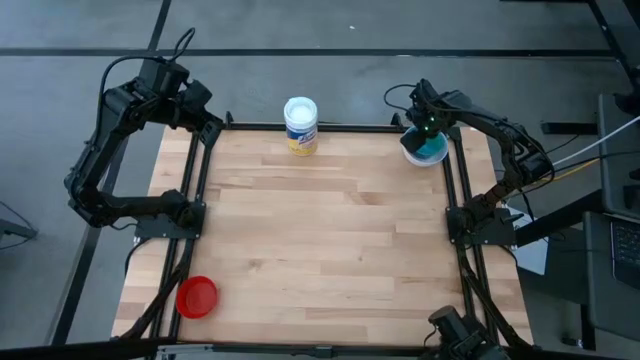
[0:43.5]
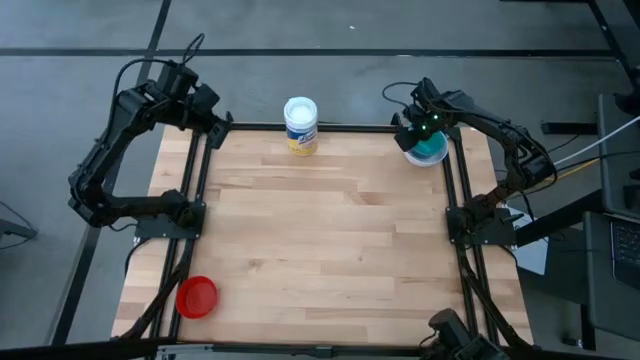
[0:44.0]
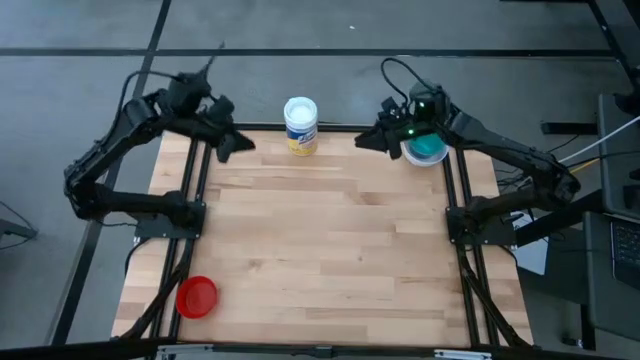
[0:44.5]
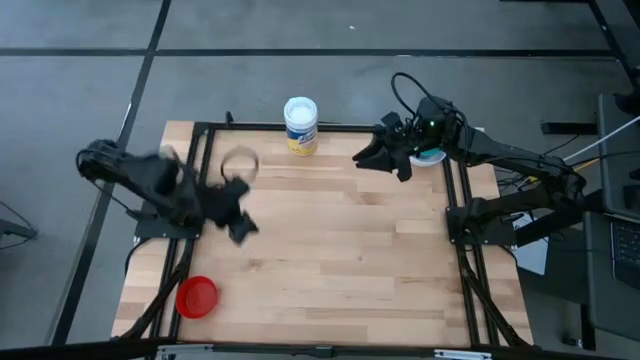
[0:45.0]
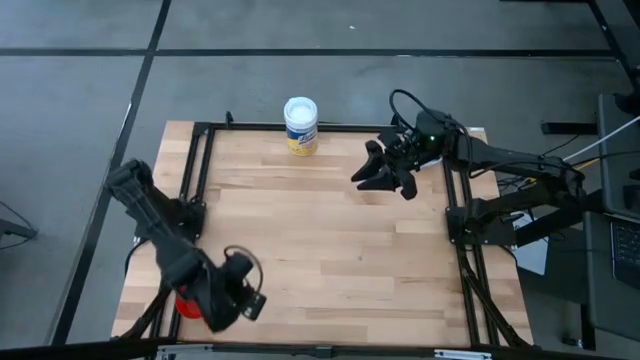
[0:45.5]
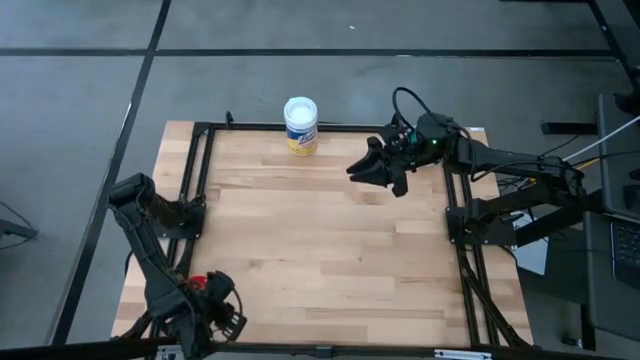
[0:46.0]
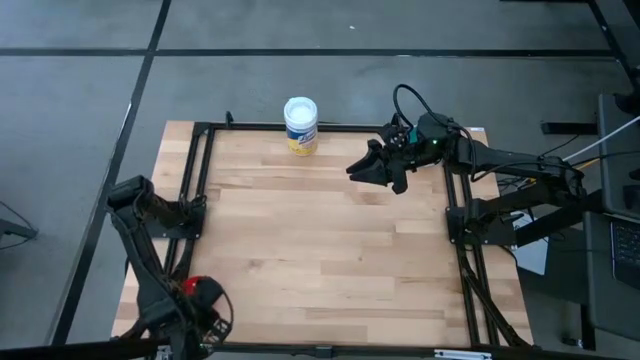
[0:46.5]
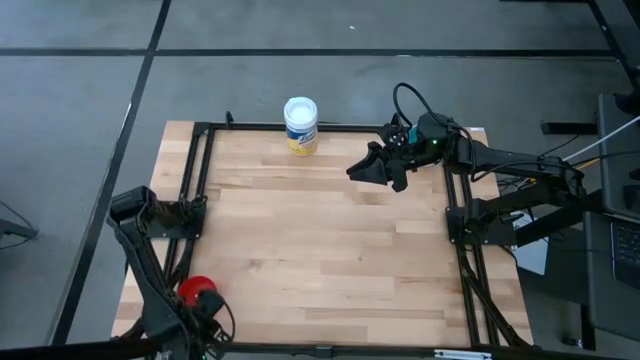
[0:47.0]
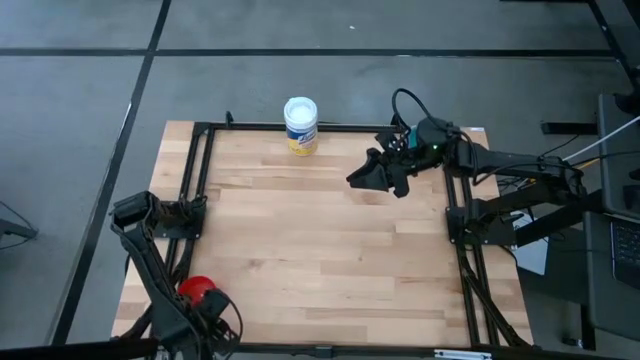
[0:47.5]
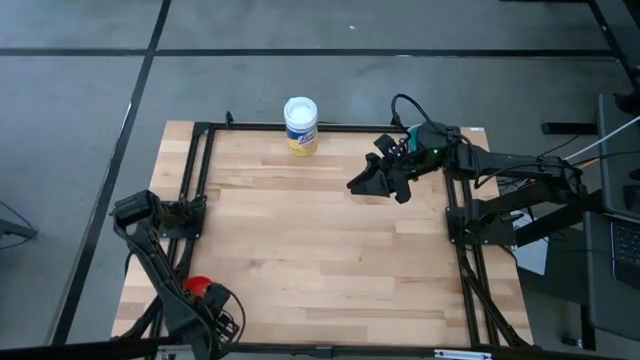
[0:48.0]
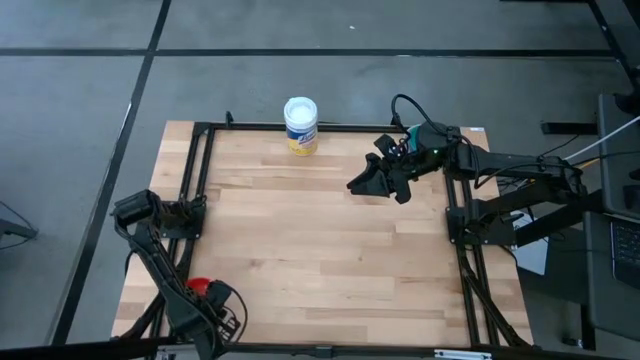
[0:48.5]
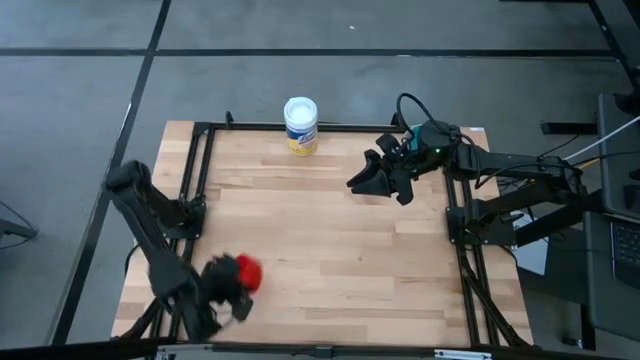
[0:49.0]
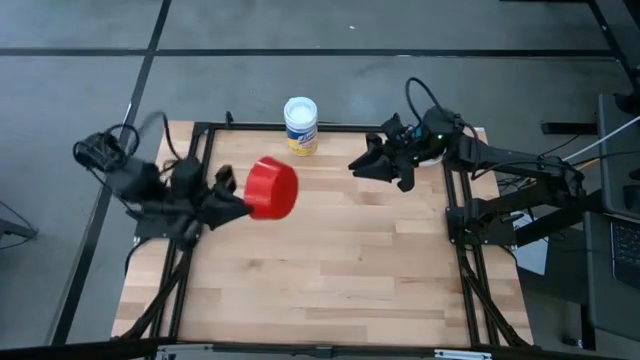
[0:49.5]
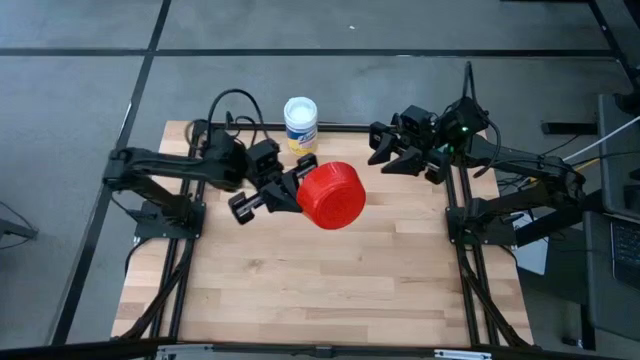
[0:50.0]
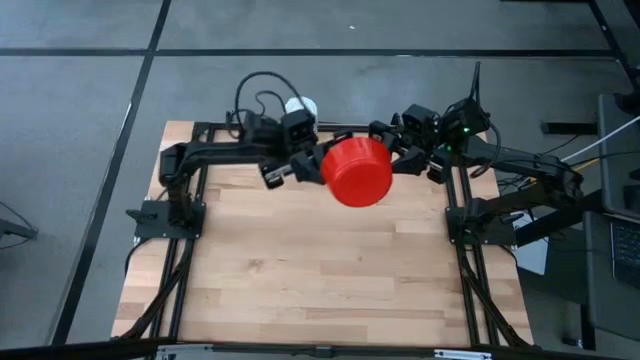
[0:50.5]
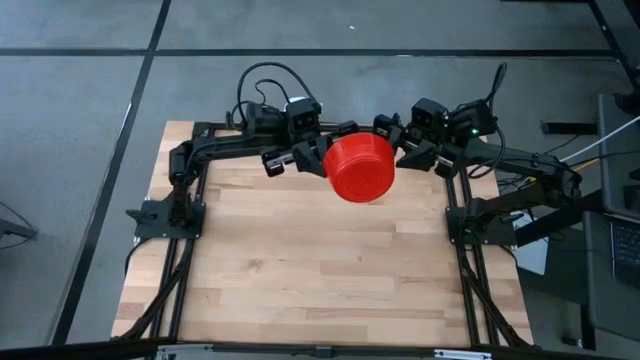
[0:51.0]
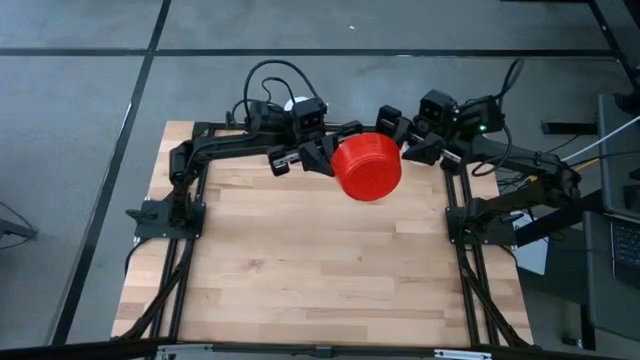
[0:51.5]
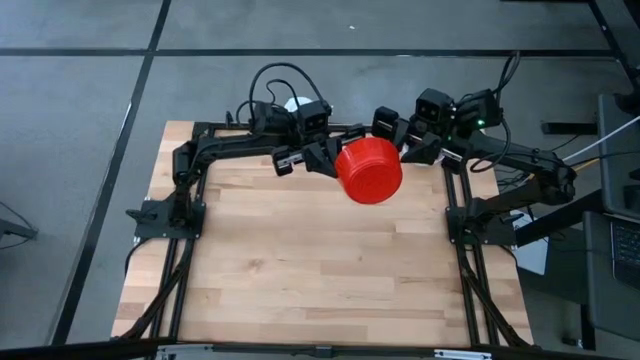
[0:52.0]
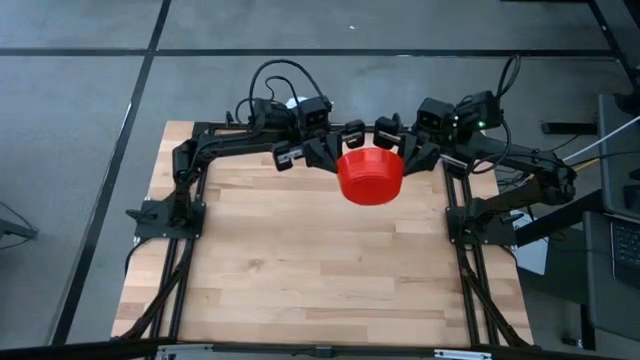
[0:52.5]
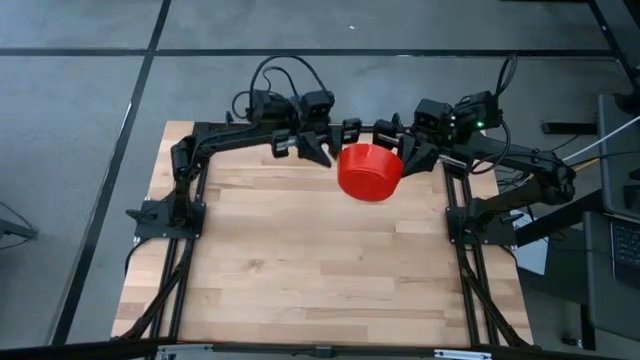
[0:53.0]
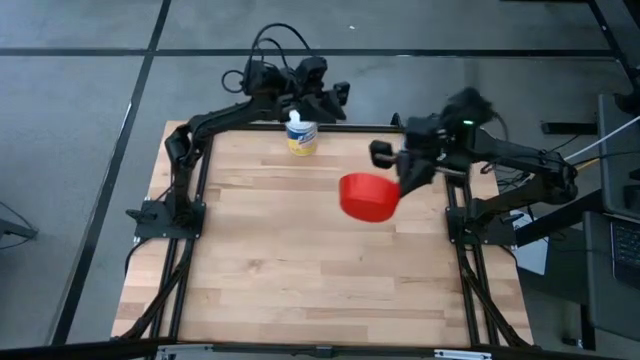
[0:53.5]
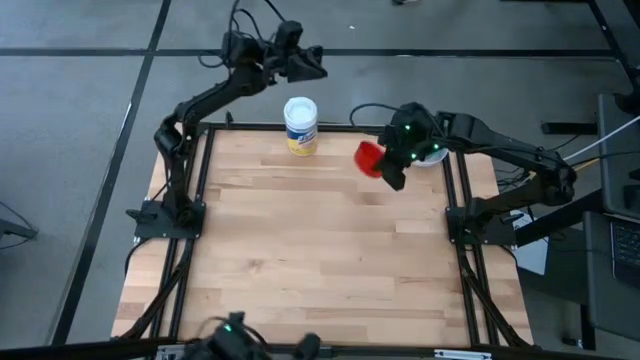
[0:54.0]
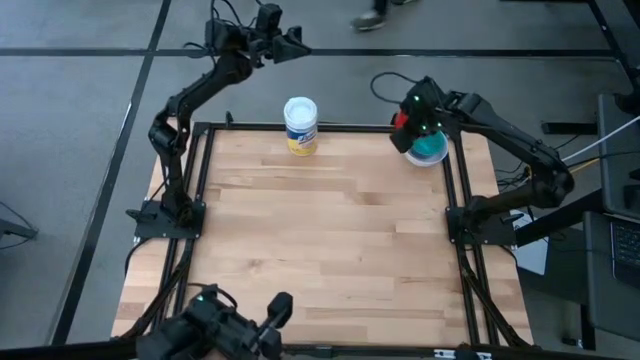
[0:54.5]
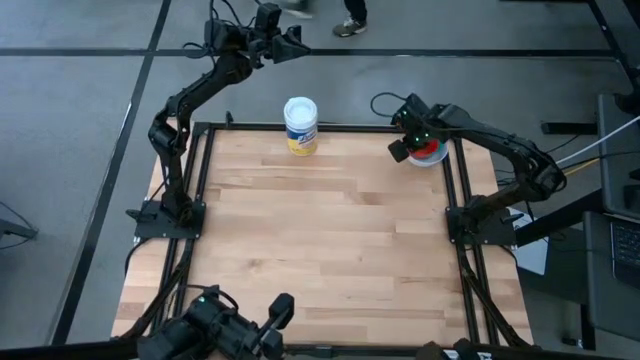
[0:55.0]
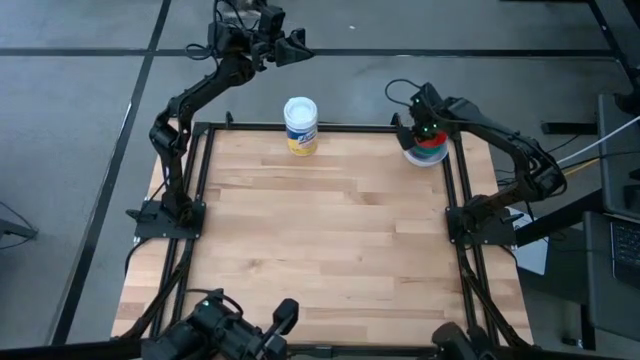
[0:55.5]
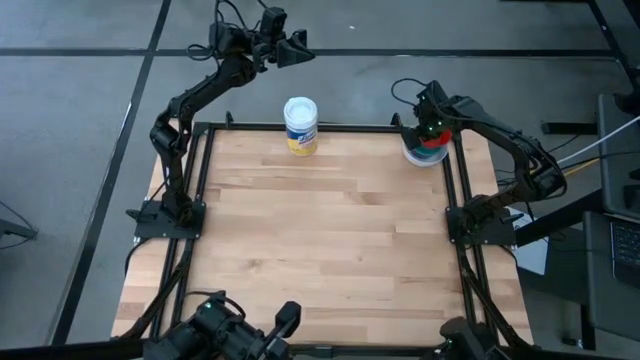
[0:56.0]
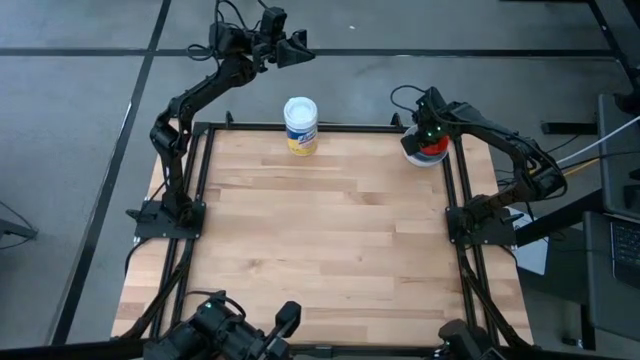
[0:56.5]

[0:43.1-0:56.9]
Stack the red bowl on top of the light blue bowl

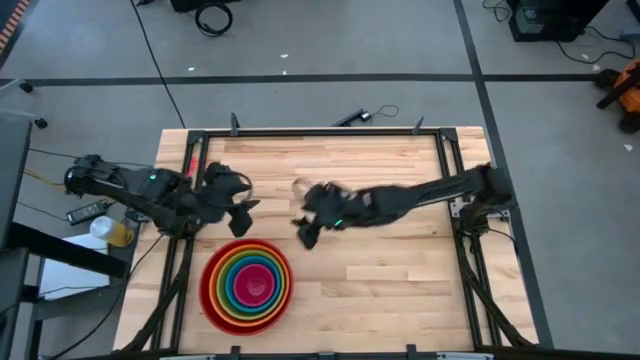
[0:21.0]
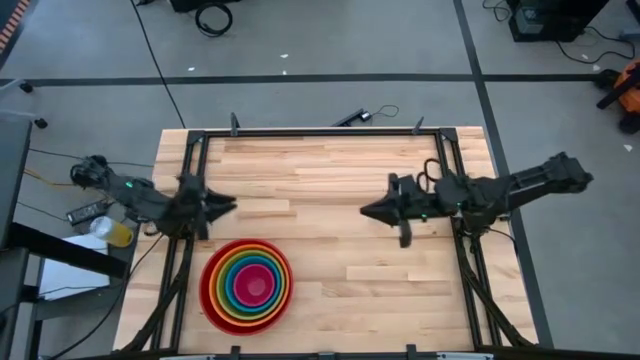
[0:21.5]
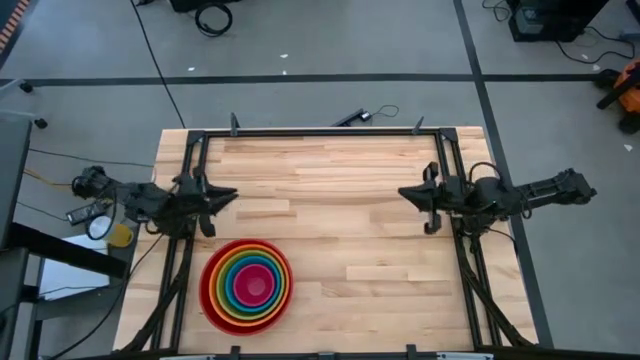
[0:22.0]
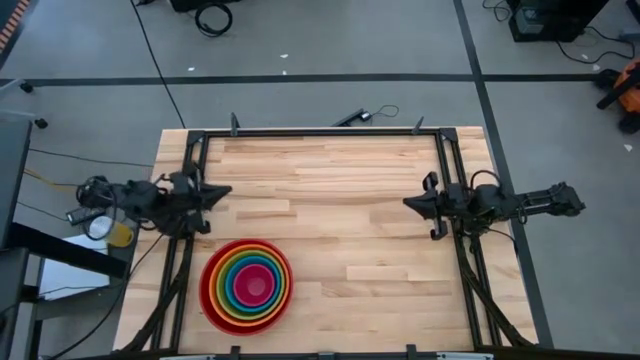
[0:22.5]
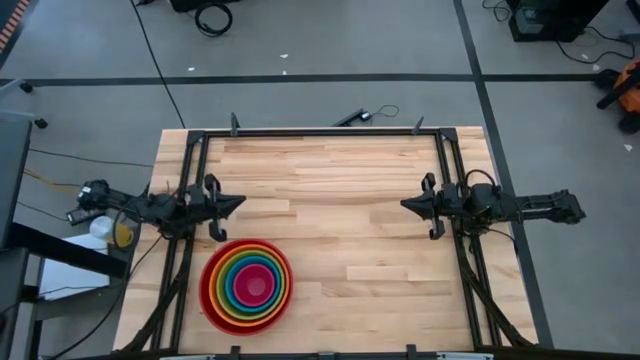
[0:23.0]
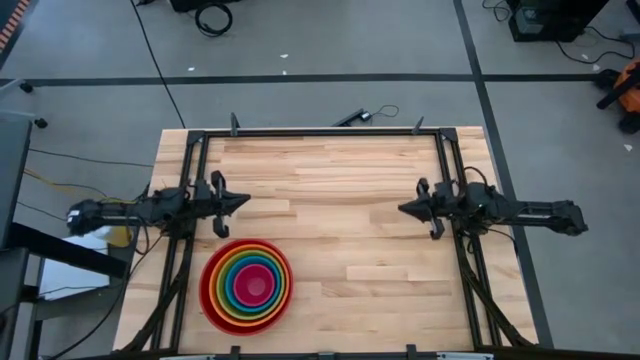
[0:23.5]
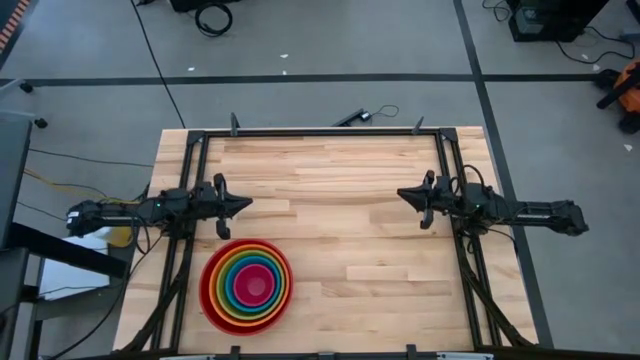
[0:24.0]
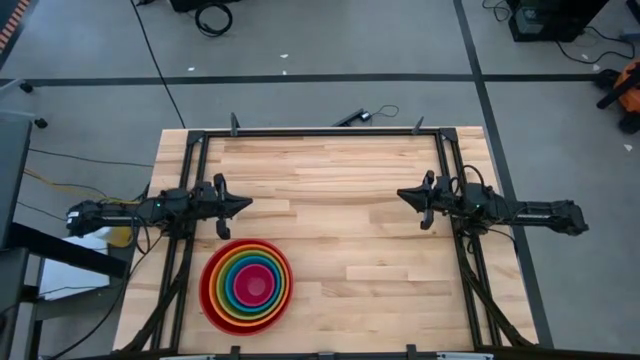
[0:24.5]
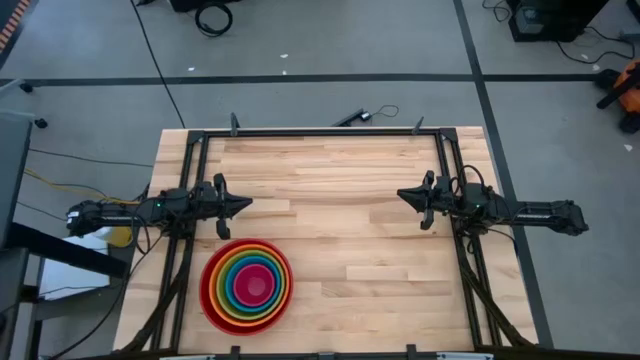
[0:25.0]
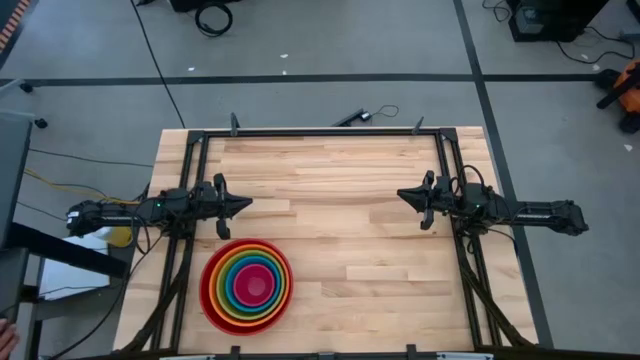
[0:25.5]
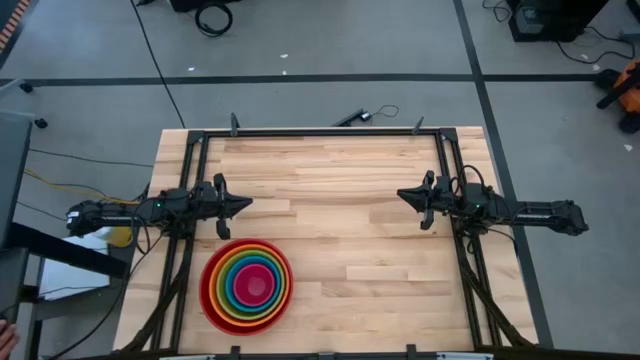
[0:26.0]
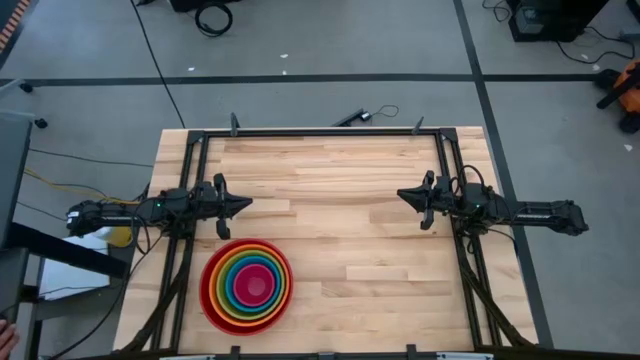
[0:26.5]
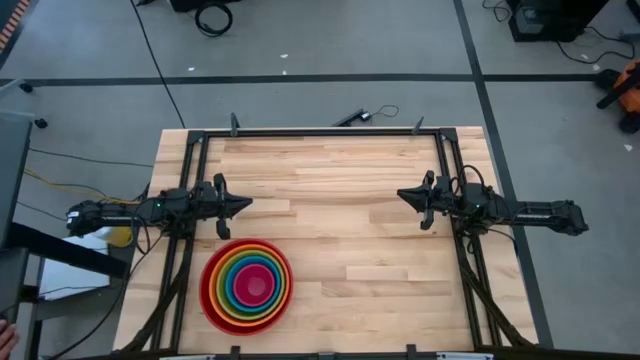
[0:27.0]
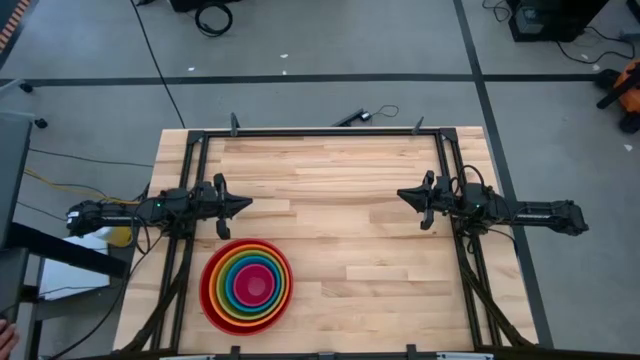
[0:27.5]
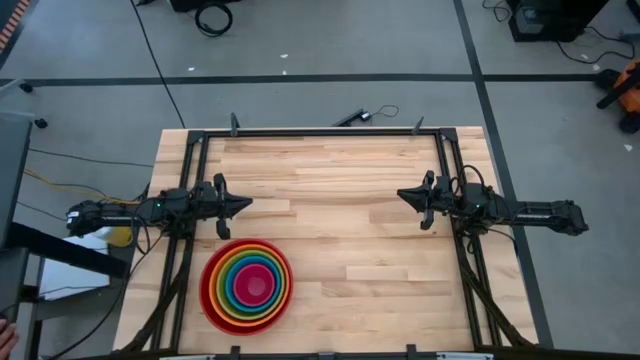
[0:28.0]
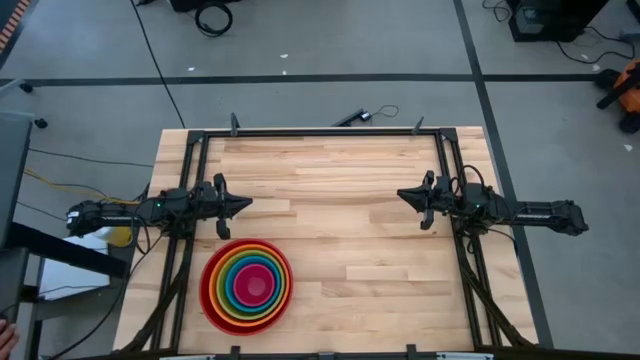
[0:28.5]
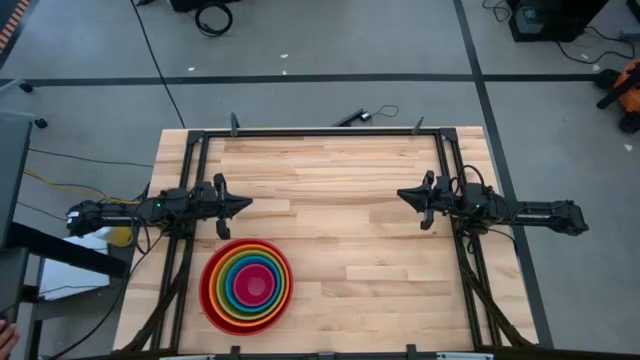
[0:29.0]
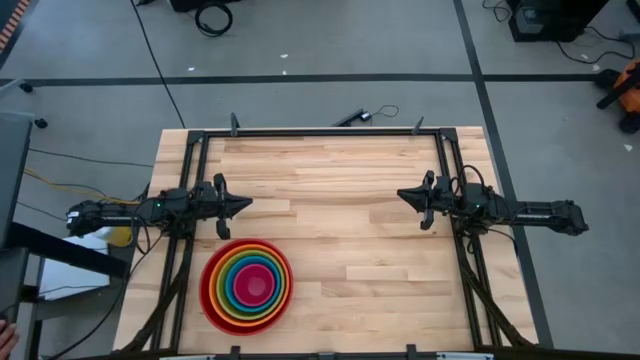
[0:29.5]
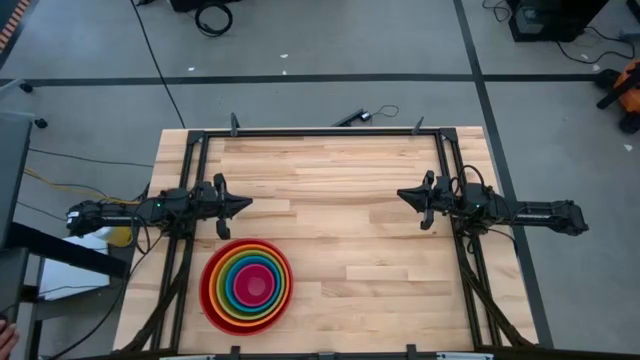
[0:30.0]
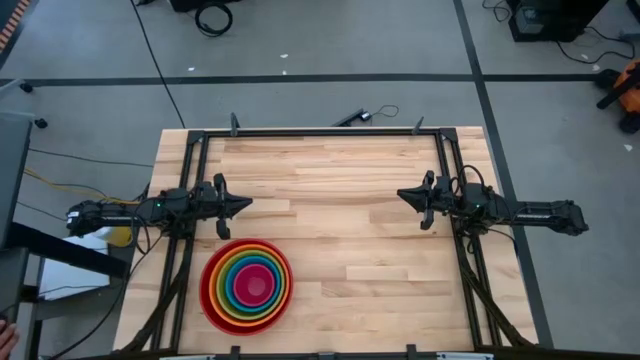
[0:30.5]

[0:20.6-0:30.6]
Return to Home Position
